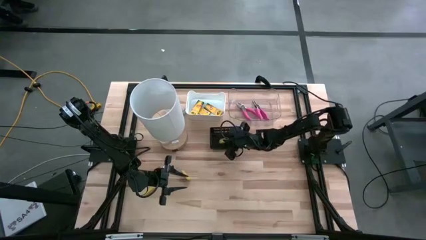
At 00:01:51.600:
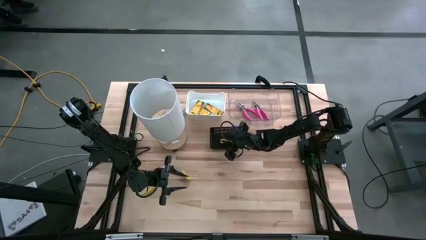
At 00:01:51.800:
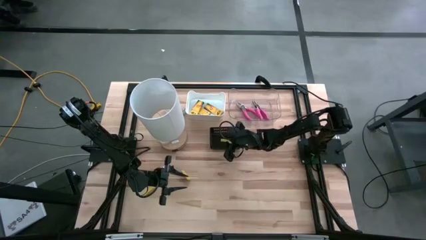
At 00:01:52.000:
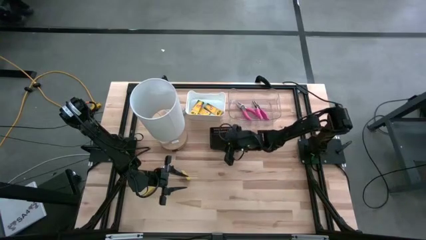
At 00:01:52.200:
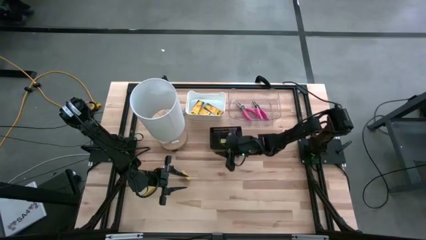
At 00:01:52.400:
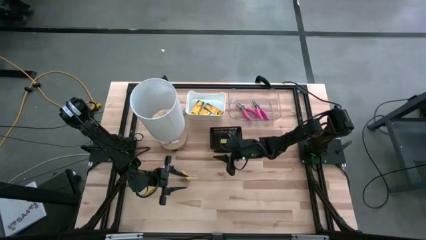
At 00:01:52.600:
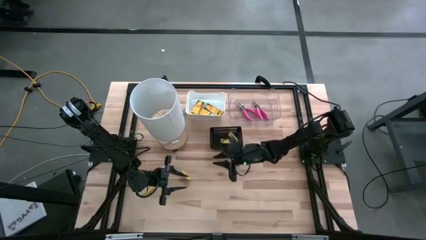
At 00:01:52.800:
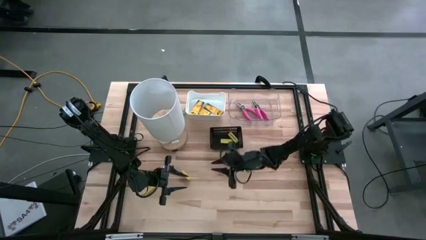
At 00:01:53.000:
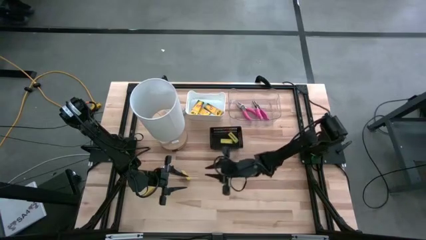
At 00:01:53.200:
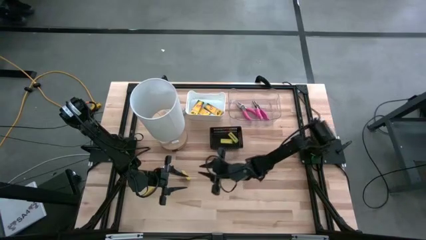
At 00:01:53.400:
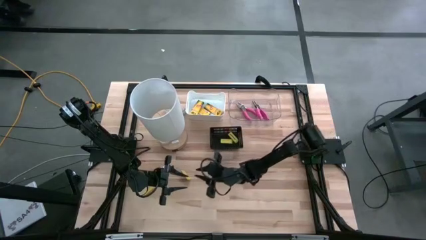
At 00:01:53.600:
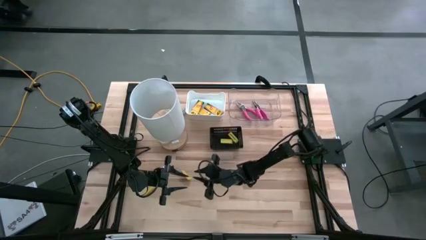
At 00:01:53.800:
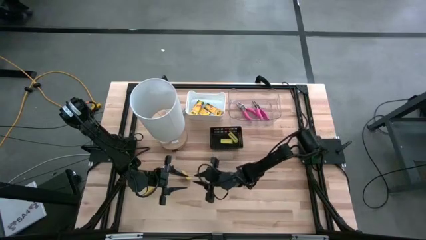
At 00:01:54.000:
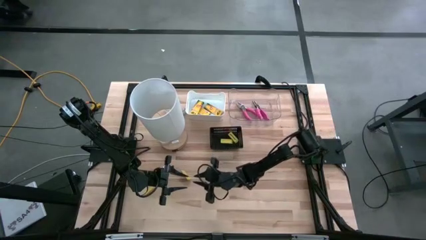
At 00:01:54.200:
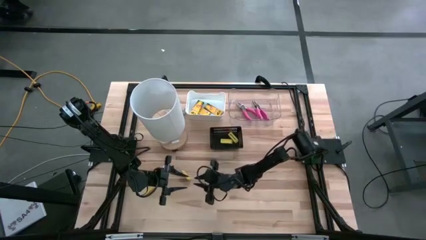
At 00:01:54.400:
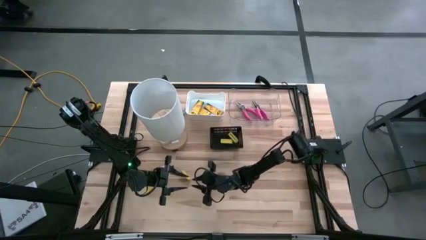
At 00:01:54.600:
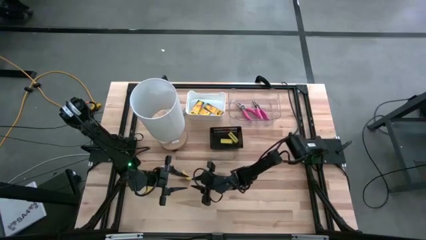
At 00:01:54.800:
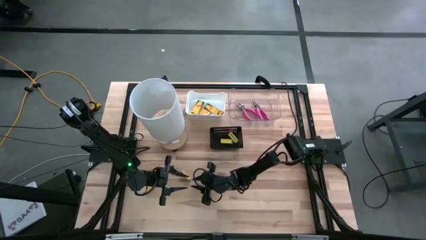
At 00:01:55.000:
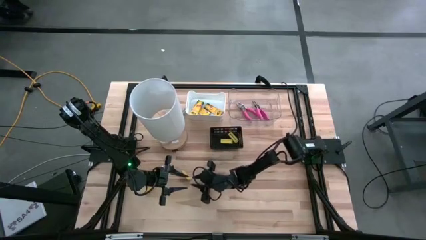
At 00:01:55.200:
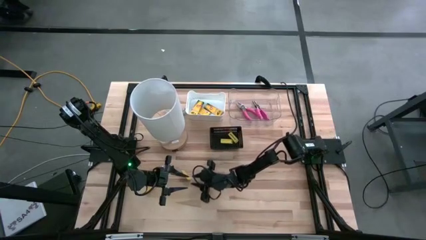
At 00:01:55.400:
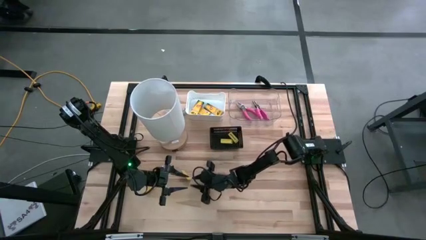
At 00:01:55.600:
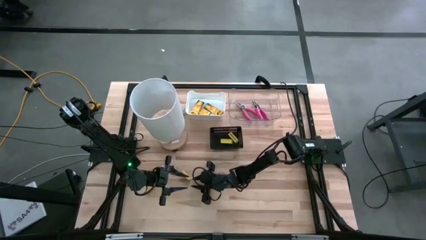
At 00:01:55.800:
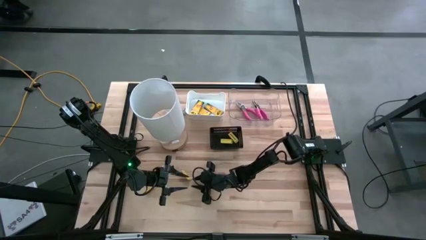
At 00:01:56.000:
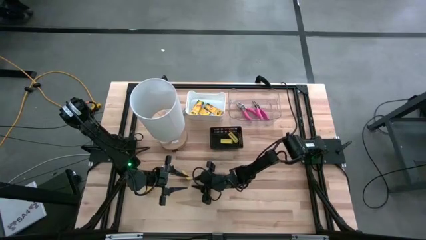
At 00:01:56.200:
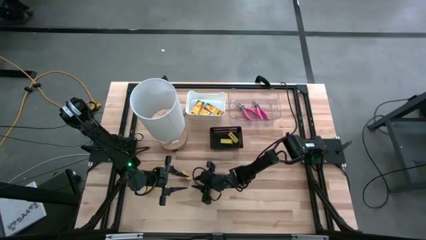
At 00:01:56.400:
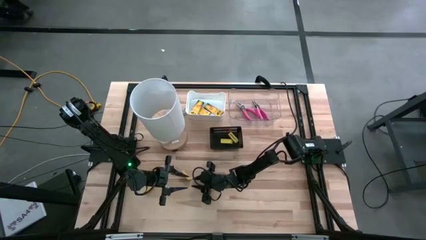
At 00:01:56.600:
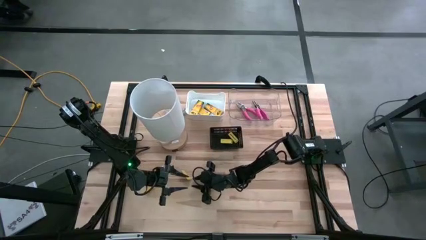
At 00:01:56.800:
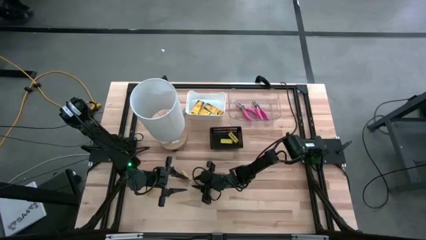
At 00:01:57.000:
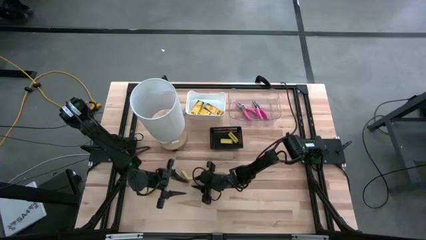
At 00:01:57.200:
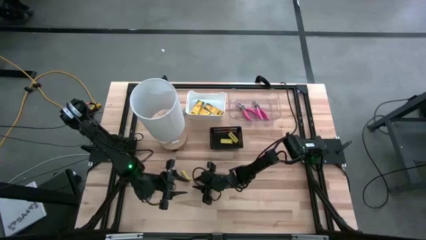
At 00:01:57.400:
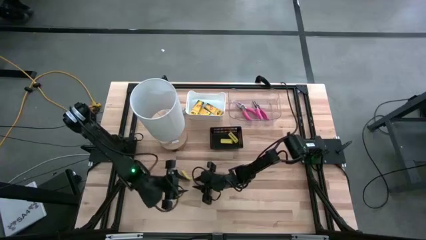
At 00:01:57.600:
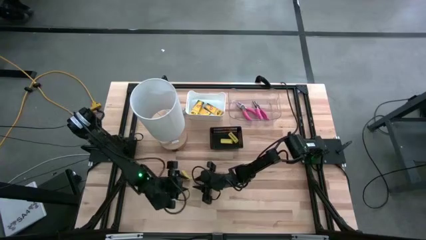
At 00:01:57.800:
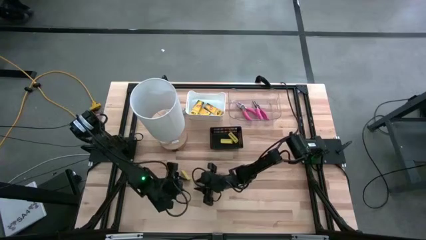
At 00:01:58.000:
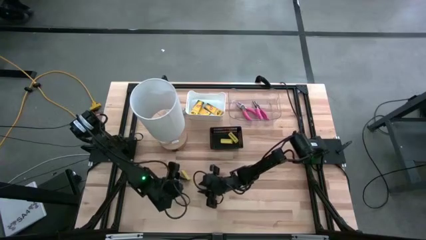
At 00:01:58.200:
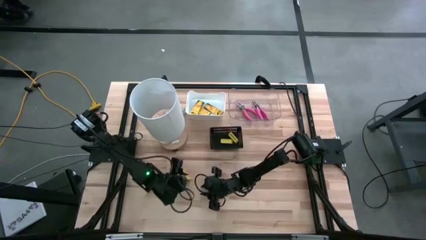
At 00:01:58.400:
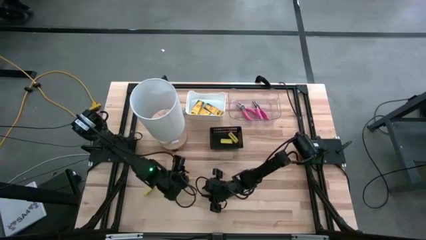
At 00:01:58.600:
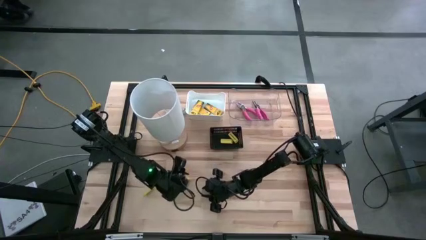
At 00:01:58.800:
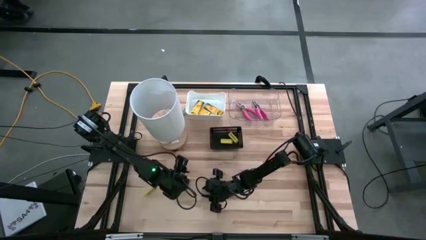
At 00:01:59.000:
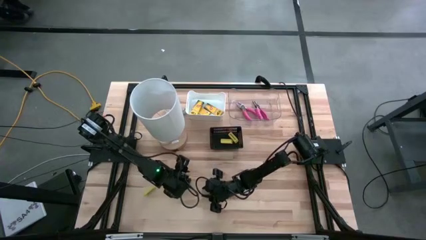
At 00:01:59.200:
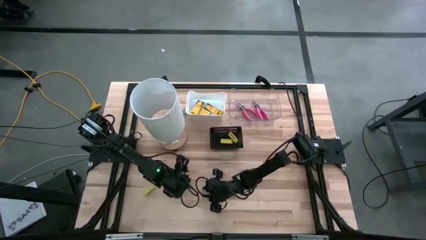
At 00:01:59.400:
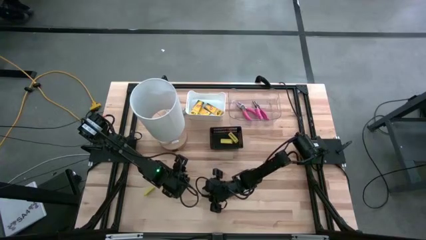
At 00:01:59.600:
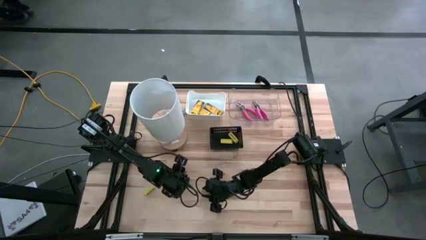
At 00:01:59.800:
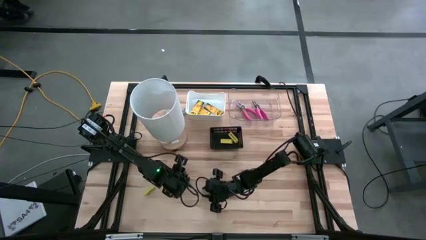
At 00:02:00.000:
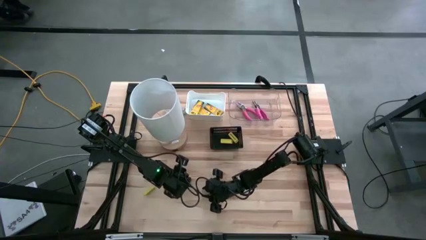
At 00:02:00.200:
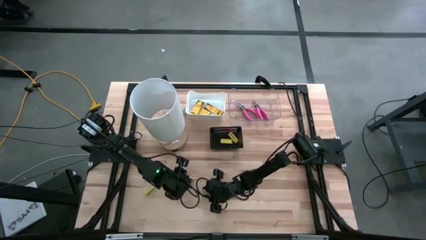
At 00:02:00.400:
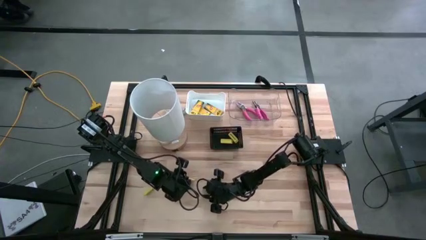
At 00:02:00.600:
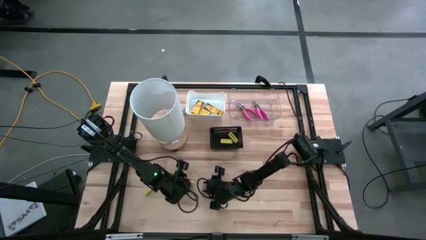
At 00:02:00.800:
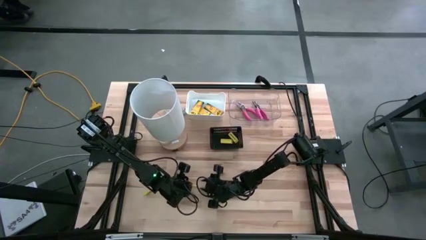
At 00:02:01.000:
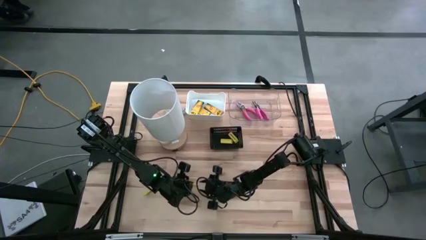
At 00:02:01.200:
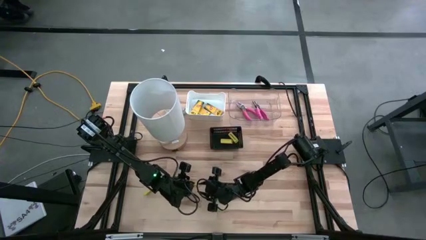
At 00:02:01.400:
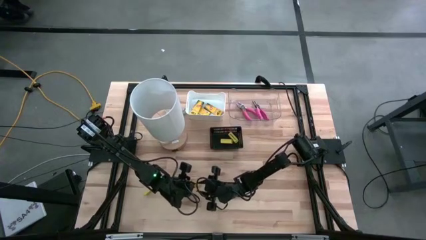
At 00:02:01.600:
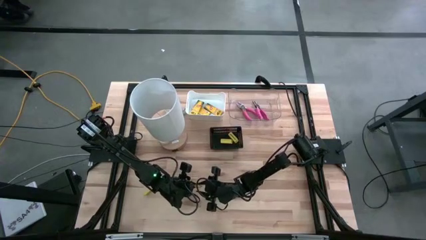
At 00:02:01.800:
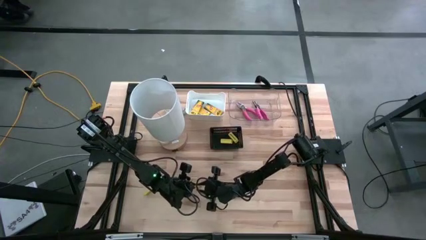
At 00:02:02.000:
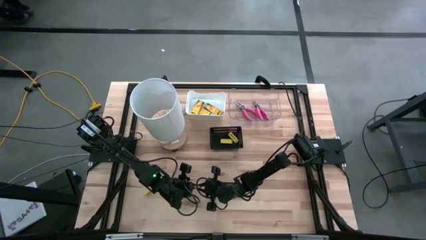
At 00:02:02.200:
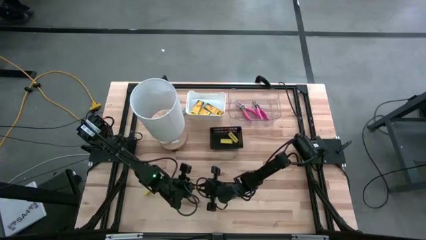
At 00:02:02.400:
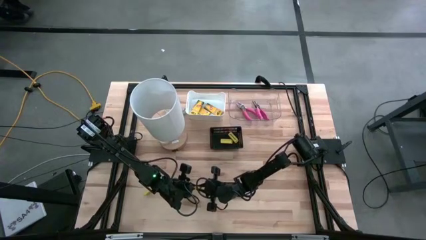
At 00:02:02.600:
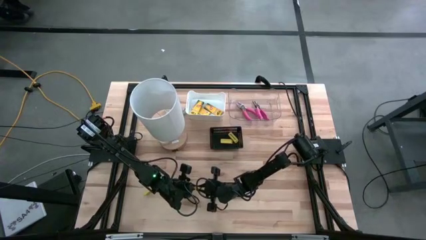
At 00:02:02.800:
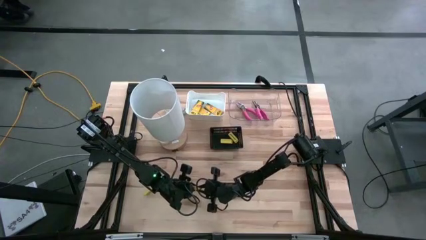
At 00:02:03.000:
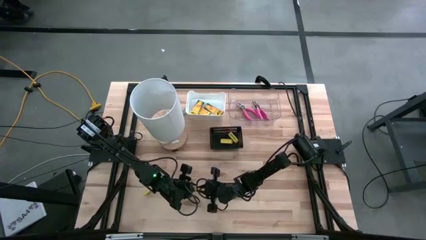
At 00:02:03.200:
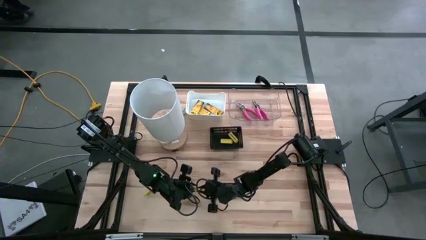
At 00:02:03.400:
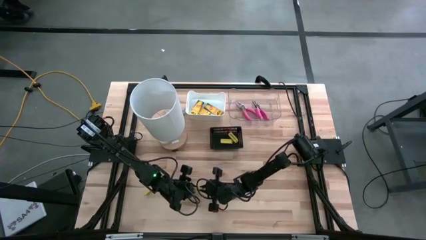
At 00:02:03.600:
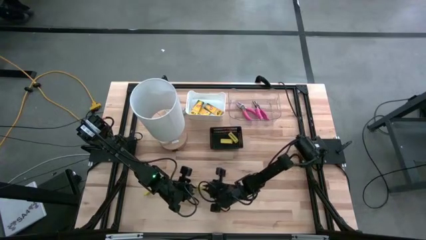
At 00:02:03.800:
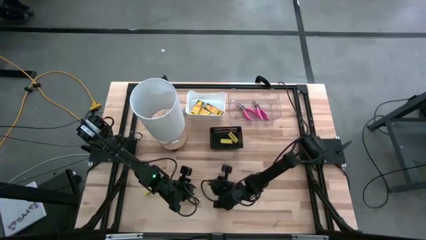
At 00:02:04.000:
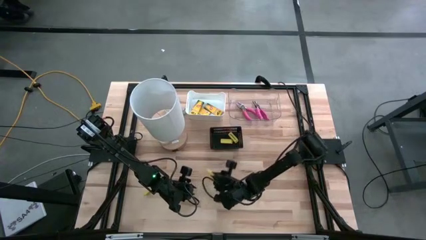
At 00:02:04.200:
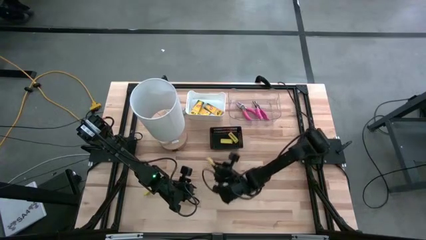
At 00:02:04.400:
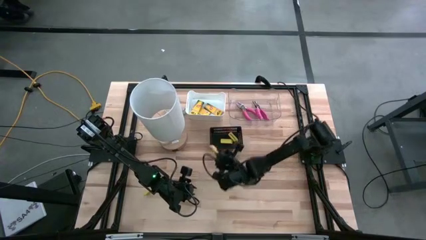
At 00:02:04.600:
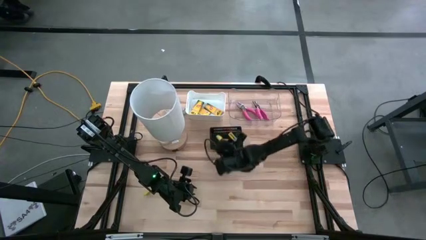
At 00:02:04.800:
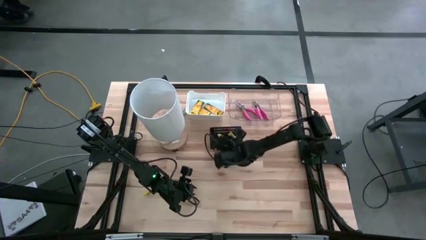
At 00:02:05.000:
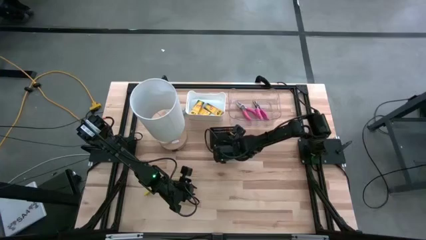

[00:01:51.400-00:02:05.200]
Task: Pick & Place School Supplies
Put the yellow eraser into the black bin
